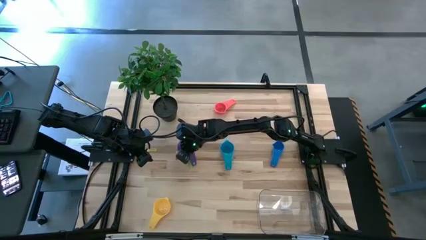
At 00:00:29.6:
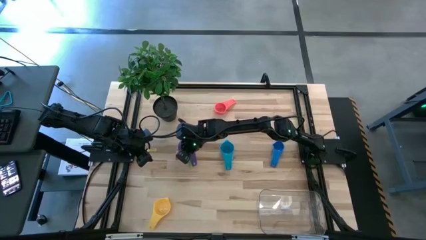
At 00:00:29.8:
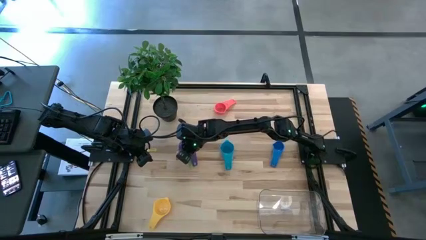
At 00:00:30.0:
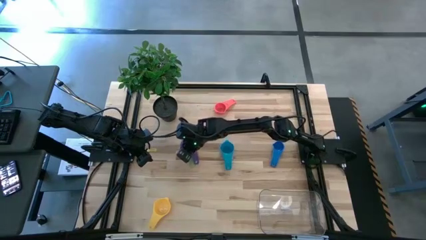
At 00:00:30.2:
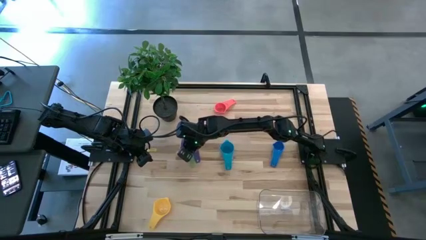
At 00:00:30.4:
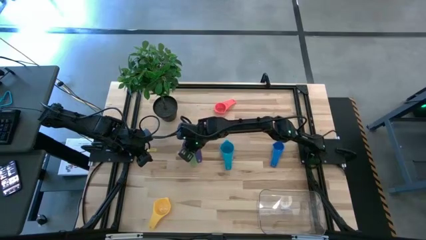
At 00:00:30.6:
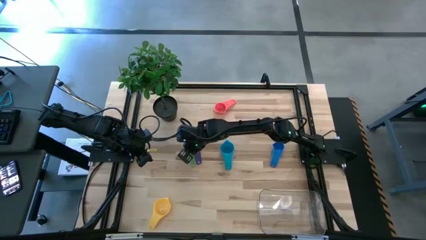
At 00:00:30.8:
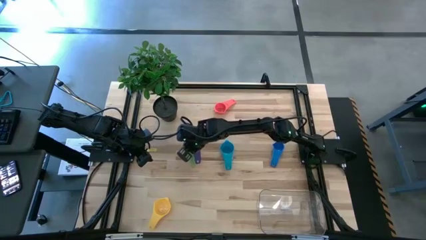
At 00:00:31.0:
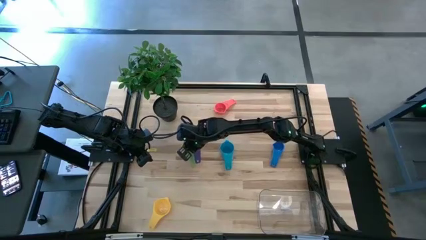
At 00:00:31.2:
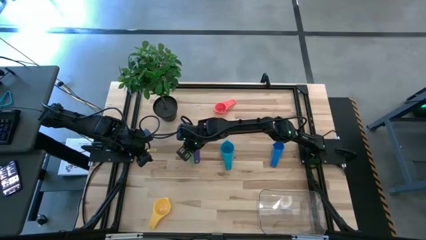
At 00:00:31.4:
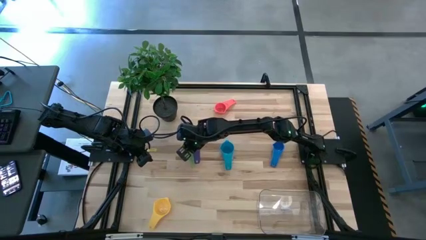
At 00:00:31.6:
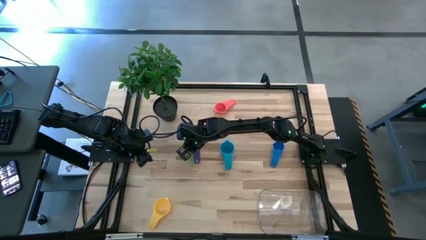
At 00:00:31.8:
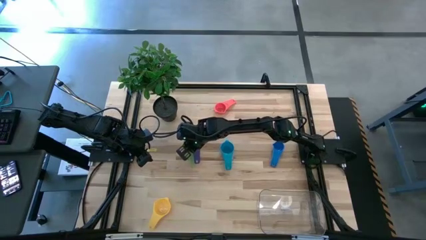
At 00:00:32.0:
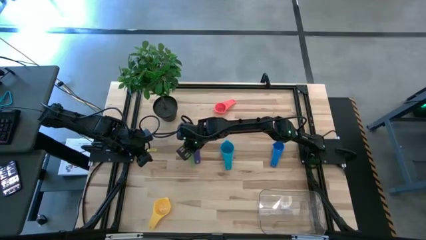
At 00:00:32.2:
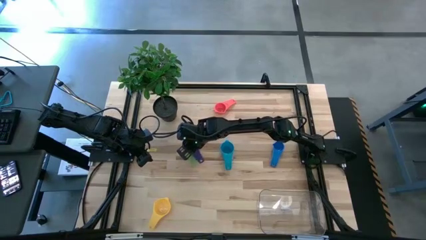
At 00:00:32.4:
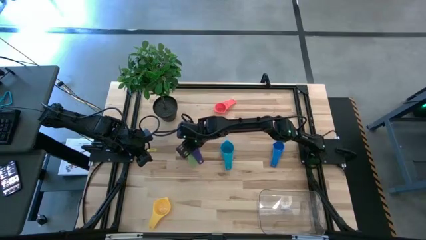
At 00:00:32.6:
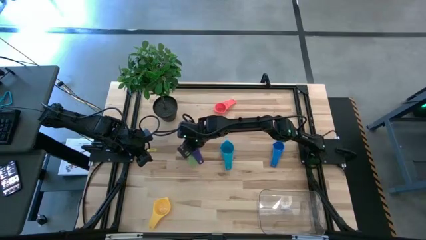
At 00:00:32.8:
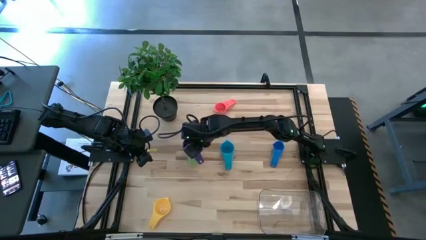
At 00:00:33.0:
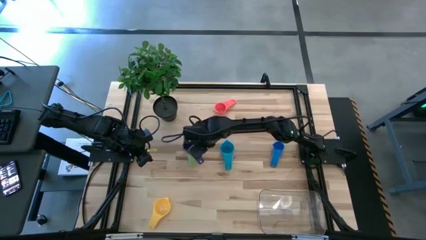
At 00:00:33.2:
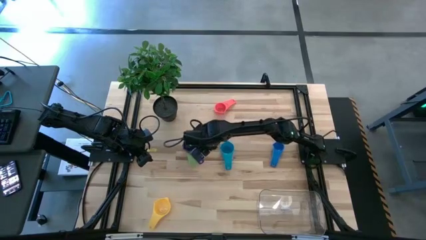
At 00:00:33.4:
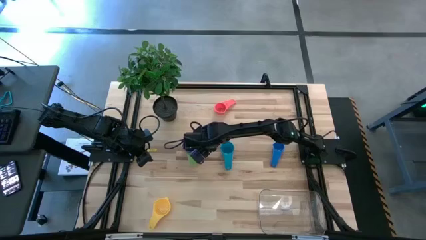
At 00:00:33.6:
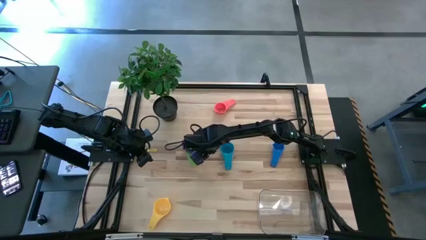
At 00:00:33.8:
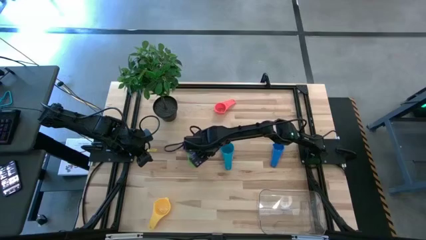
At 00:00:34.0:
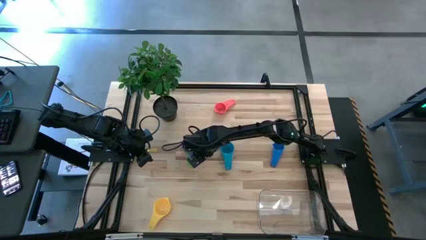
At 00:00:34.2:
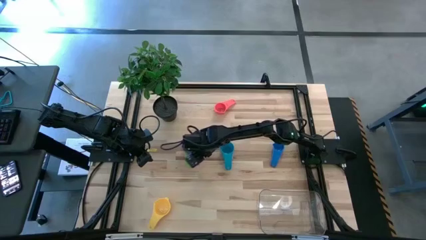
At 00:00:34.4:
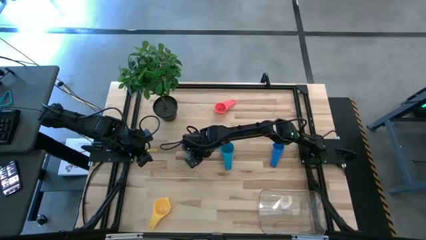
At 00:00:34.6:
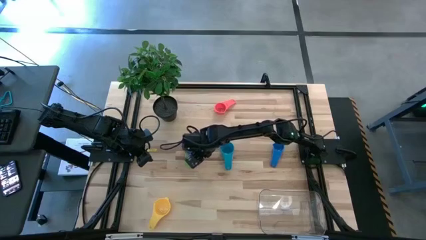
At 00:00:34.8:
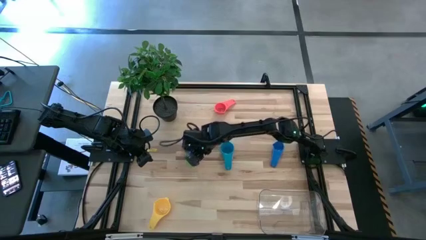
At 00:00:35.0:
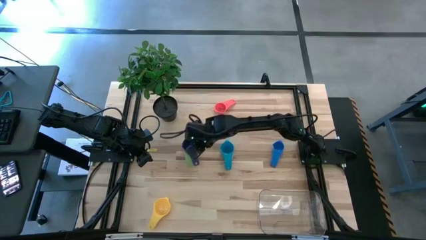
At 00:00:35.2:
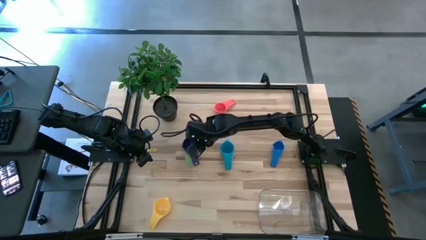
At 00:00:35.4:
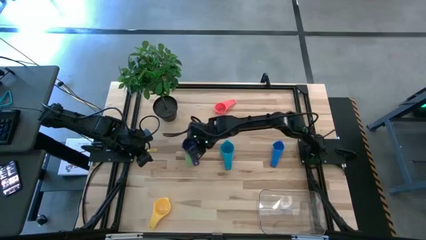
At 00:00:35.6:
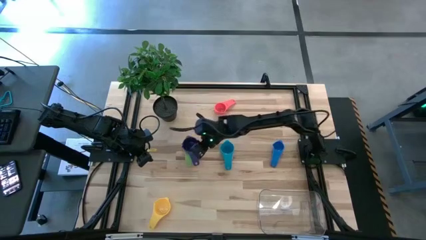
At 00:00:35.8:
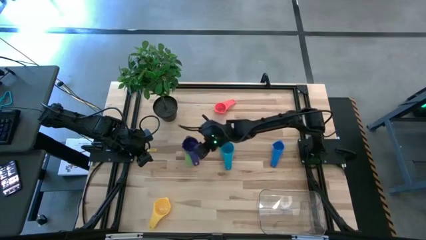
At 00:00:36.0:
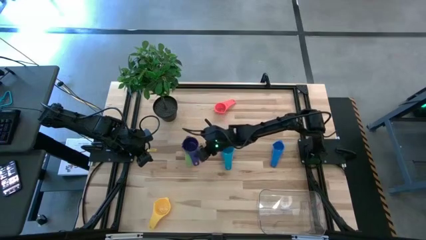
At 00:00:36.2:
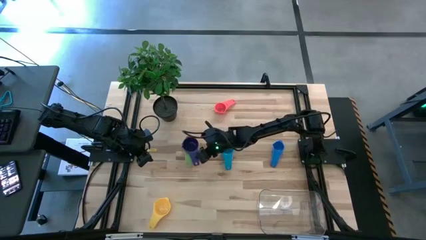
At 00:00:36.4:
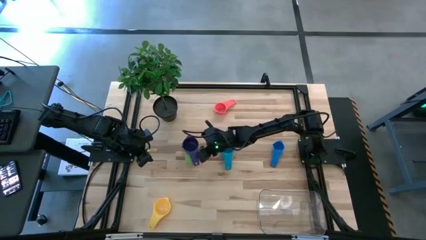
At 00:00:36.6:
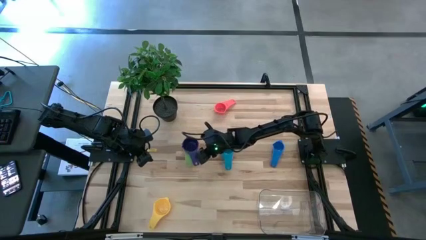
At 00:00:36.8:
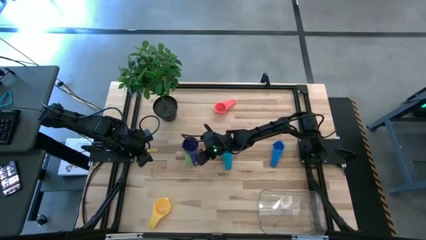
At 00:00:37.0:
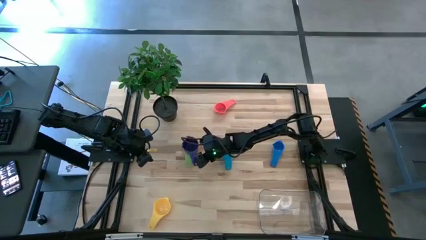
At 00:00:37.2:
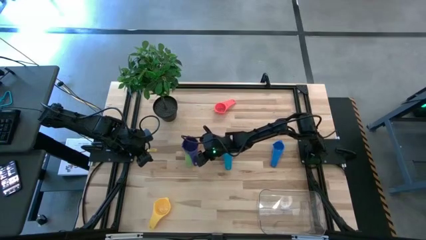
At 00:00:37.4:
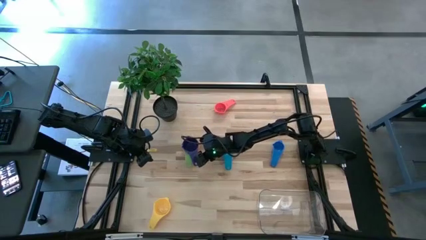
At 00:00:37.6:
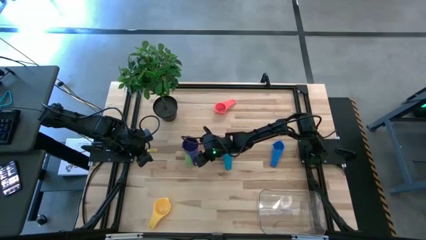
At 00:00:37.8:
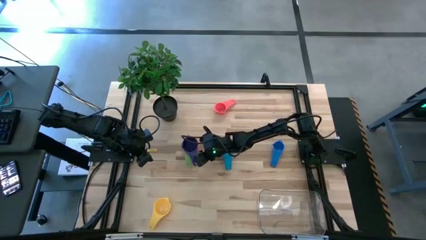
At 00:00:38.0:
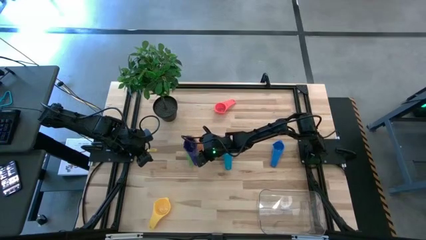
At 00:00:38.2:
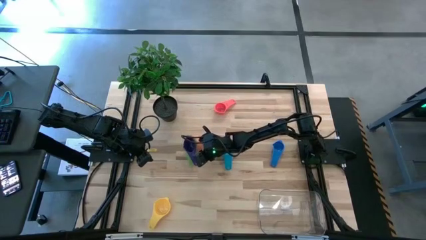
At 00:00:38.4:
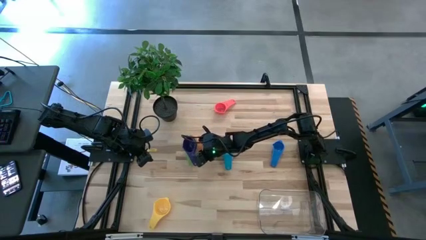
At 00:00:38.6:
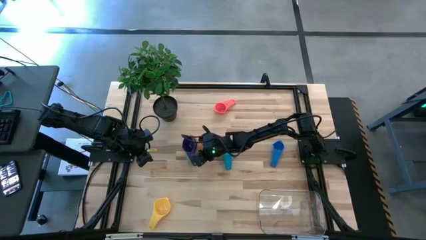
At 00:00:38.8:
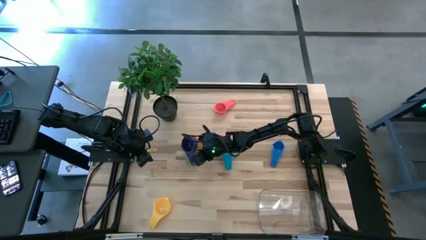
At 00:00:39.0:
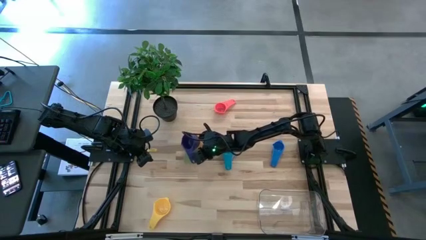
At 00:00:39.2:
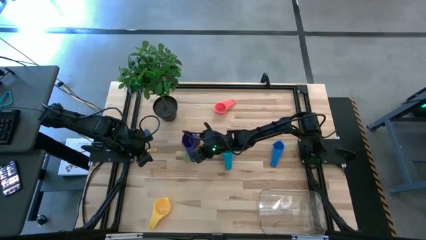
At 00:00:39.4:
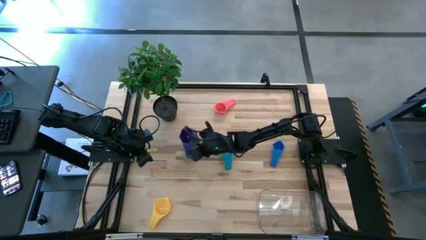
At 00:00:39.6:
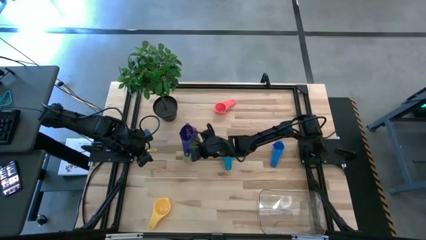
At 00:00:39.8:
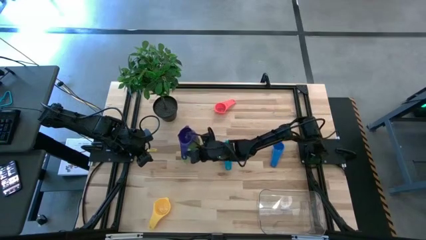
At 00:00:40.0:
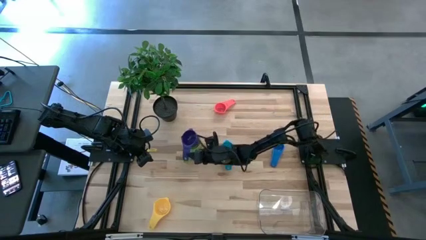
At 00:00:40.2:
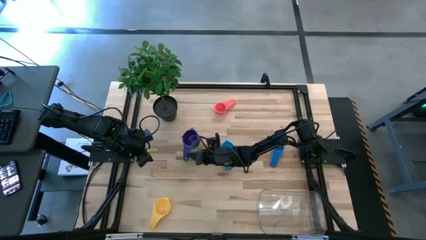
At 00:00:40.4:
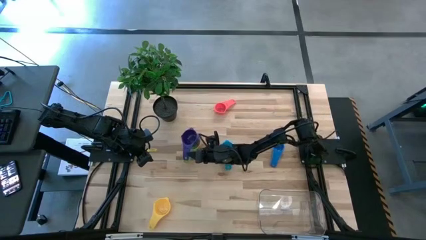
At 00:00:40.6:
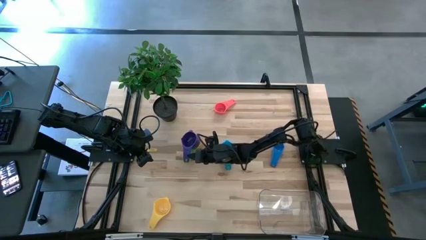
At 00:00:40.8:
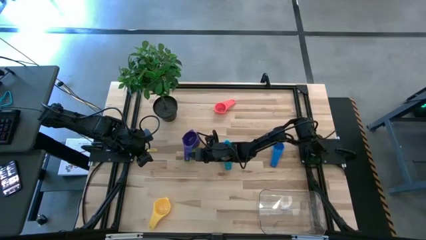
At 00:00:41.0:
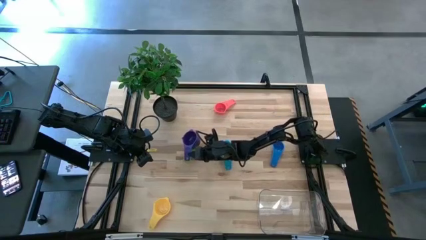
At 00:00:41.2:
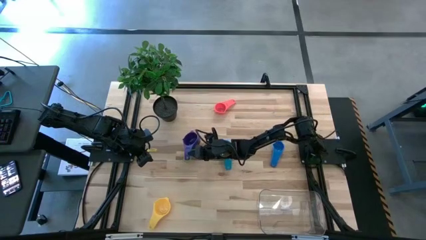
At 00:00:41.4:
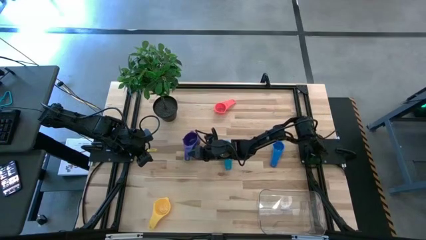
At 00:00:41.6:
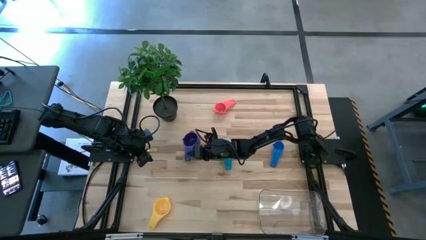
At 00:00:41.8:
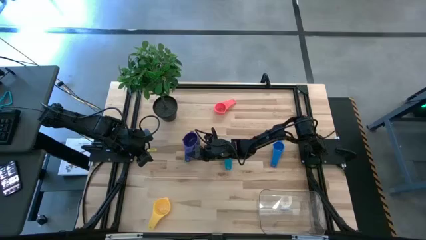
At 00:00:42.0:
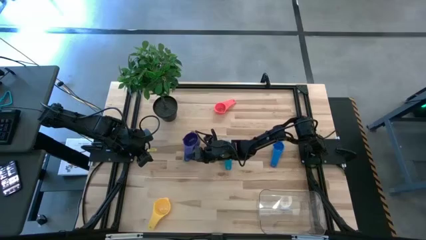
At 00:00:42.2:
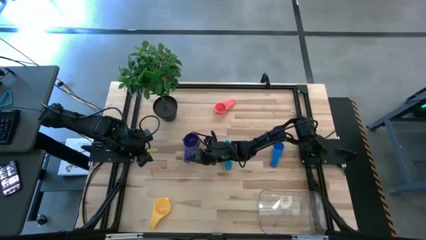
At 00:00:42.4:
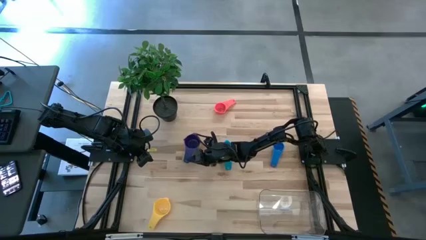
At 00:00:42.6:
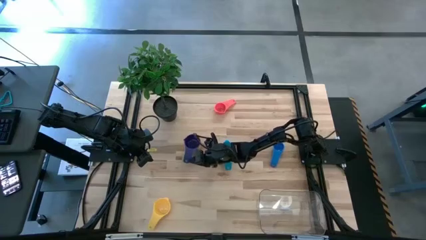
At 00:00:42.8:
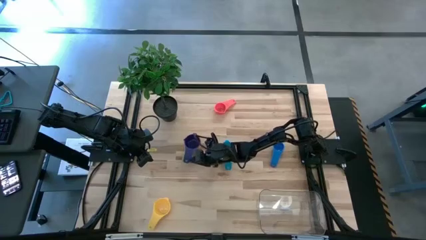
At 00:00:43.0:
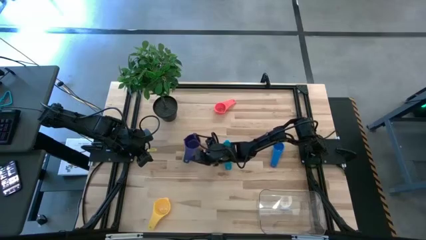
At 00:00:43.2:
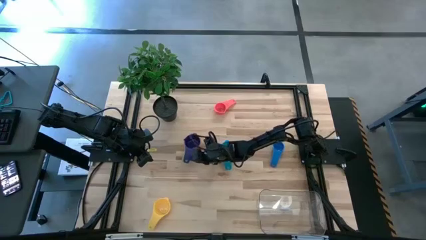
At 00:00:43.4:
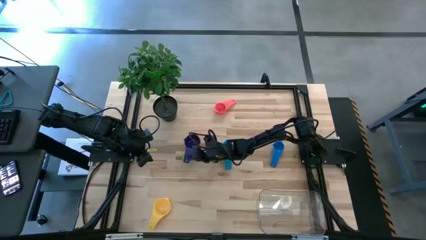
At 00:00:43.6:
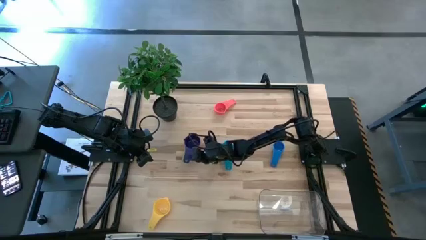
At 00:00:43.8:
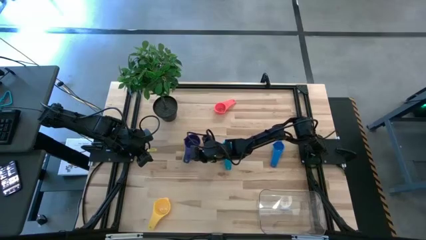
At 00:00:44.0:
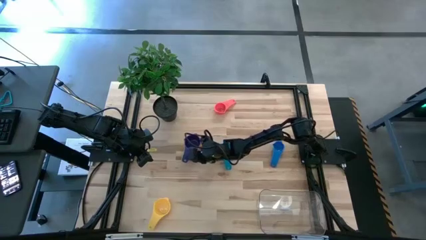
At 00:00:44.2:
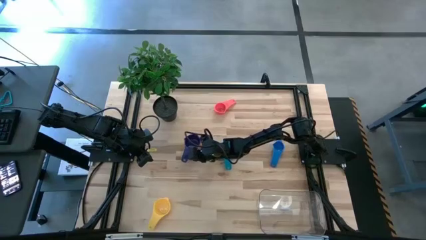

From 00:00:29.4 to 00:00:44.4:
Task: Nest measuring cups in basket
Stack the violet measuring cup on the green measuring cup
